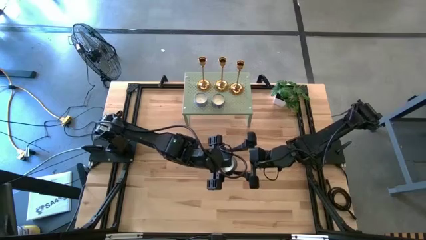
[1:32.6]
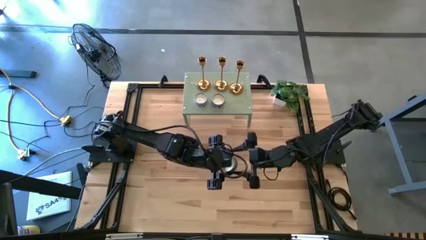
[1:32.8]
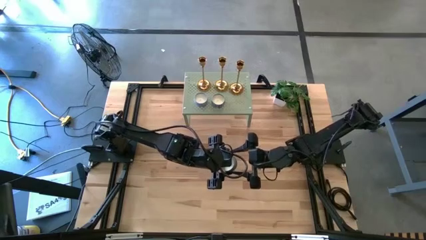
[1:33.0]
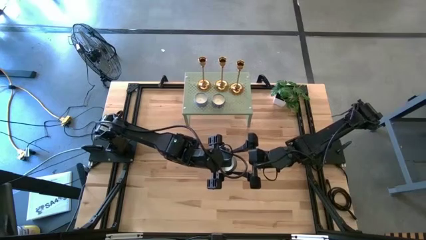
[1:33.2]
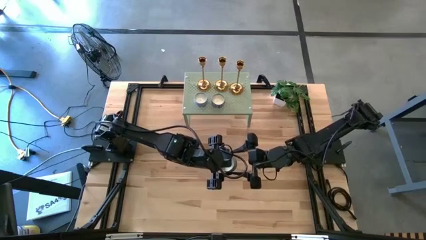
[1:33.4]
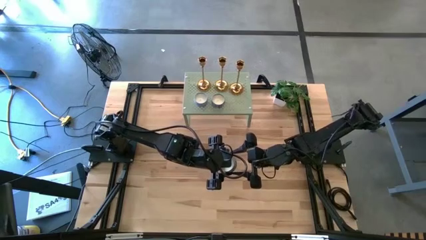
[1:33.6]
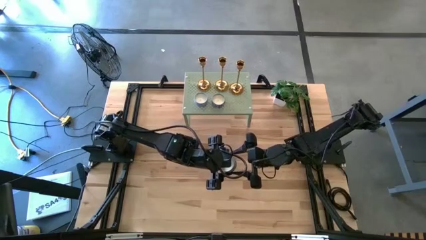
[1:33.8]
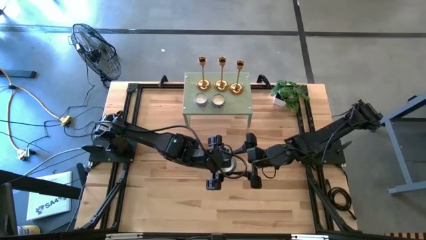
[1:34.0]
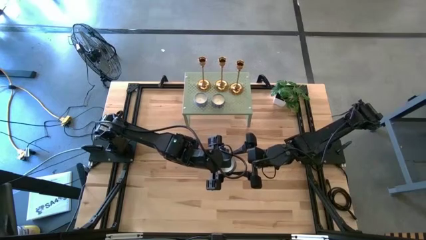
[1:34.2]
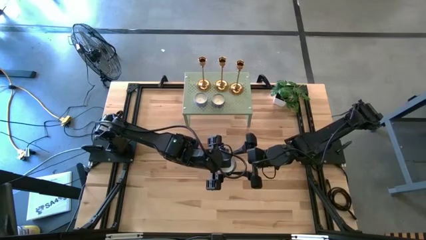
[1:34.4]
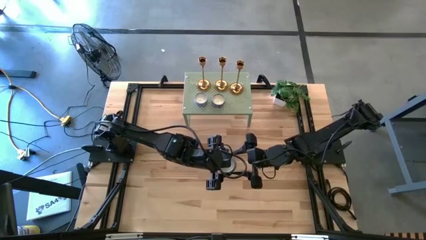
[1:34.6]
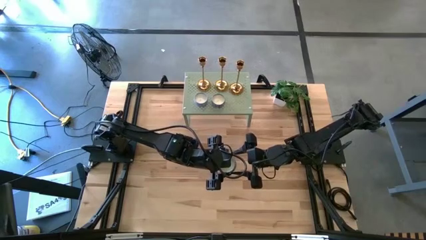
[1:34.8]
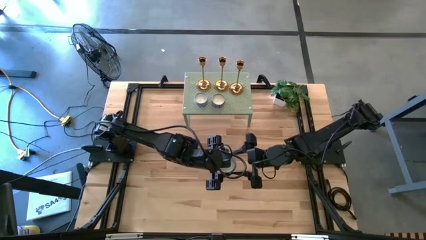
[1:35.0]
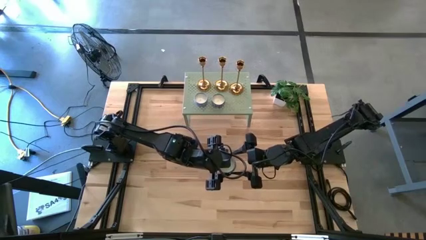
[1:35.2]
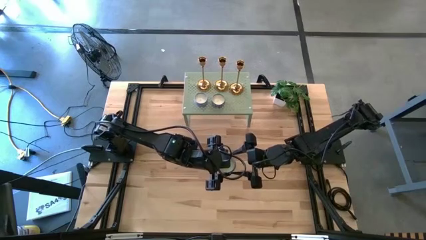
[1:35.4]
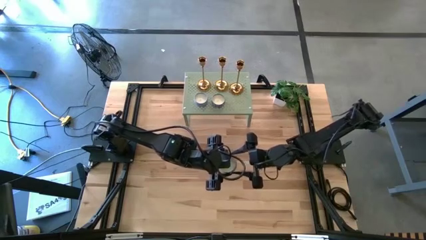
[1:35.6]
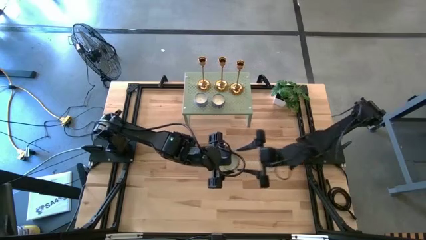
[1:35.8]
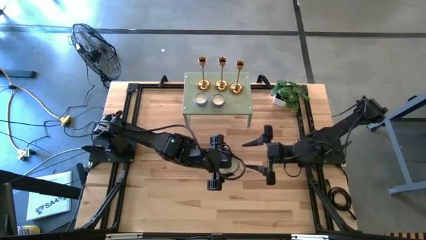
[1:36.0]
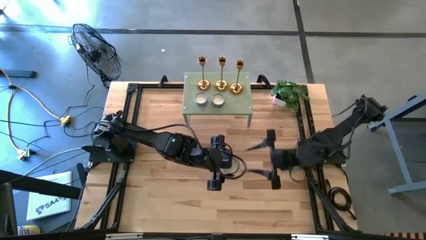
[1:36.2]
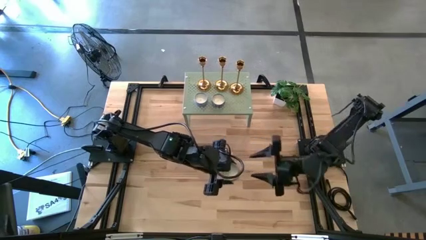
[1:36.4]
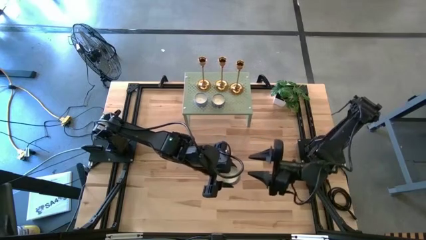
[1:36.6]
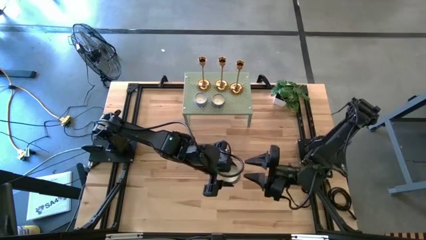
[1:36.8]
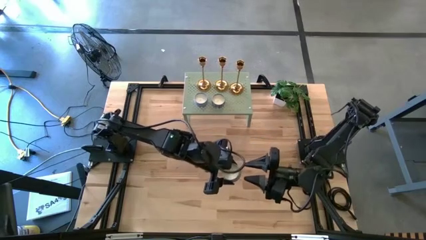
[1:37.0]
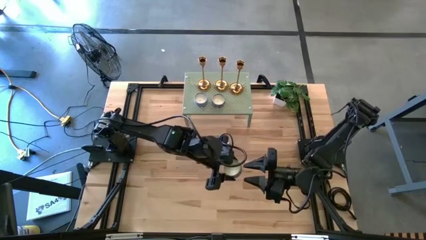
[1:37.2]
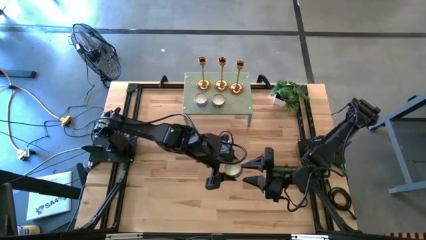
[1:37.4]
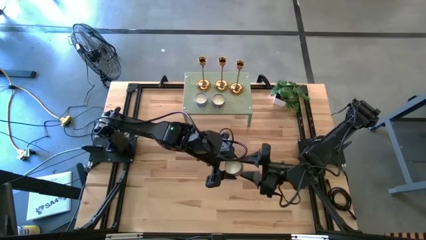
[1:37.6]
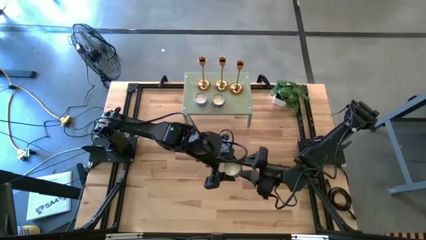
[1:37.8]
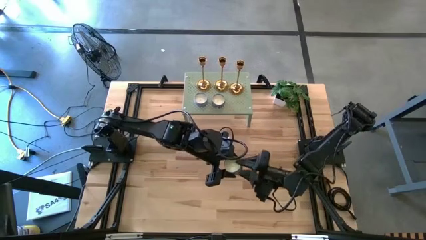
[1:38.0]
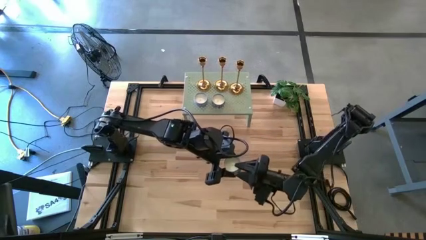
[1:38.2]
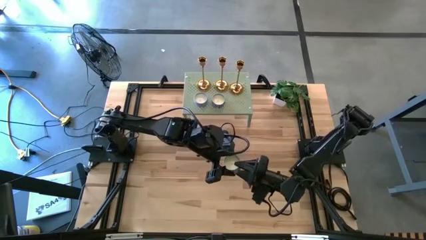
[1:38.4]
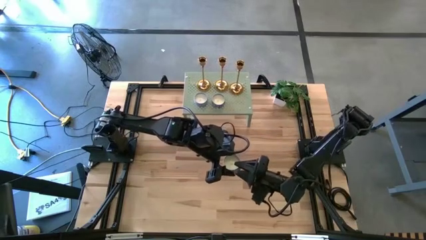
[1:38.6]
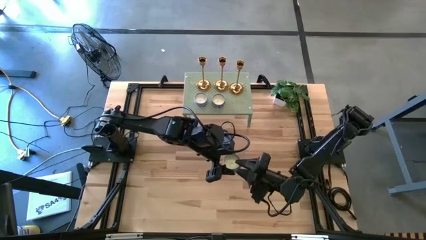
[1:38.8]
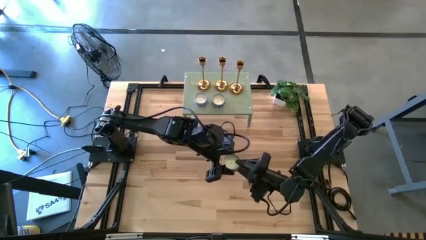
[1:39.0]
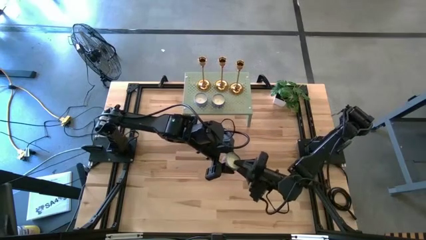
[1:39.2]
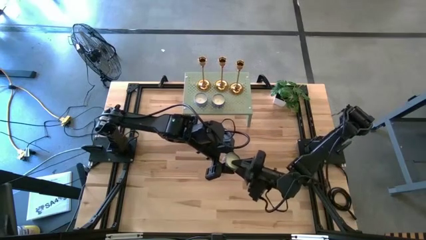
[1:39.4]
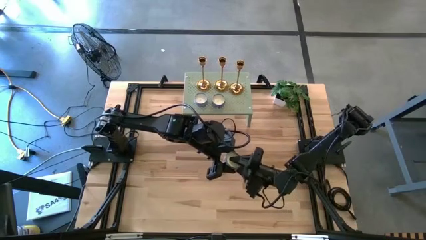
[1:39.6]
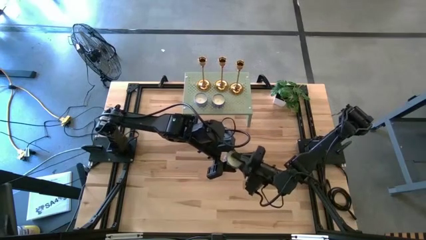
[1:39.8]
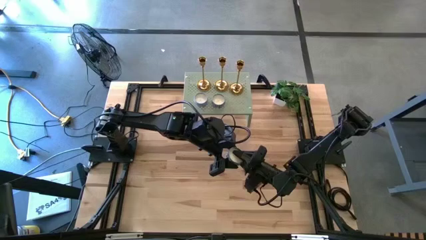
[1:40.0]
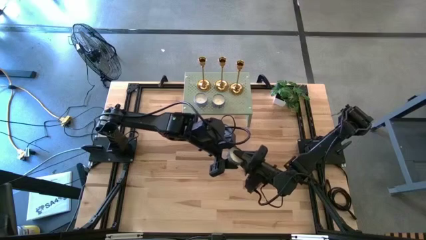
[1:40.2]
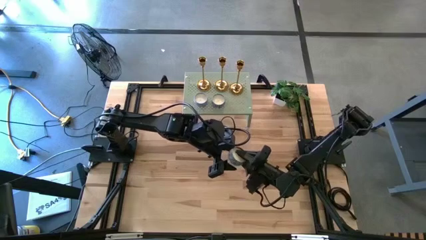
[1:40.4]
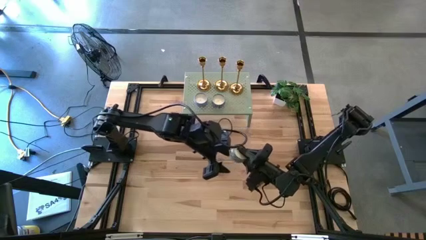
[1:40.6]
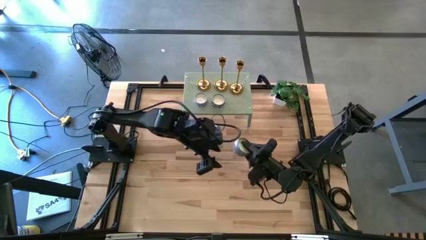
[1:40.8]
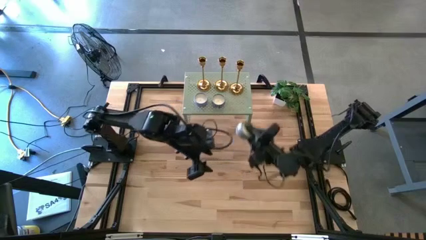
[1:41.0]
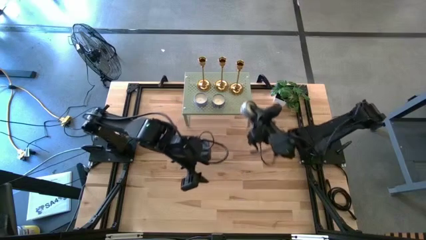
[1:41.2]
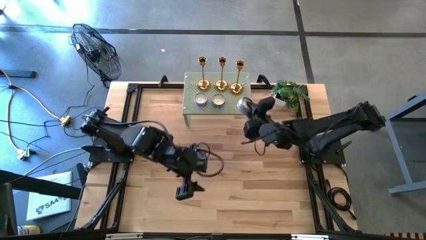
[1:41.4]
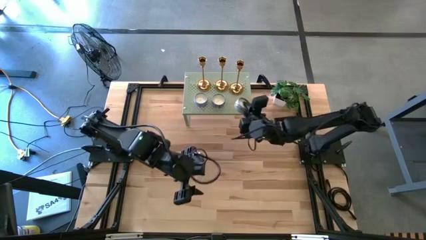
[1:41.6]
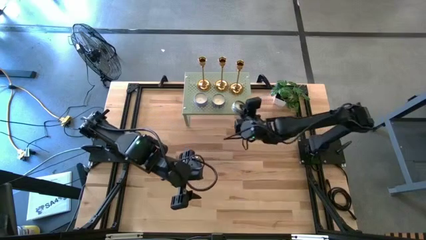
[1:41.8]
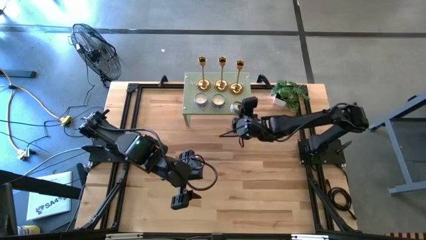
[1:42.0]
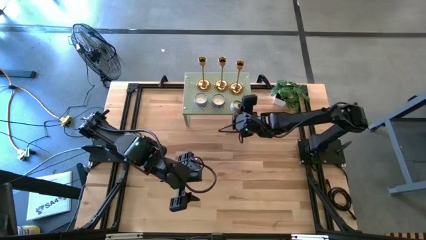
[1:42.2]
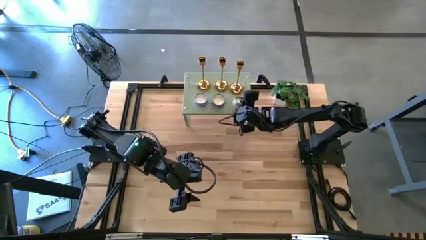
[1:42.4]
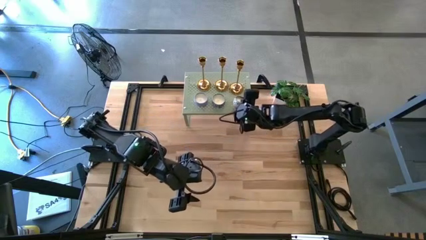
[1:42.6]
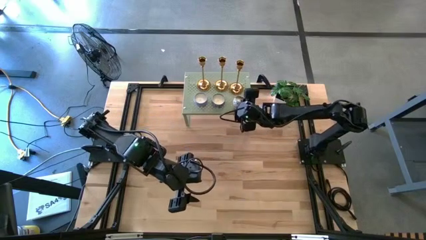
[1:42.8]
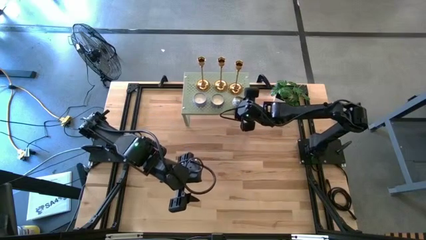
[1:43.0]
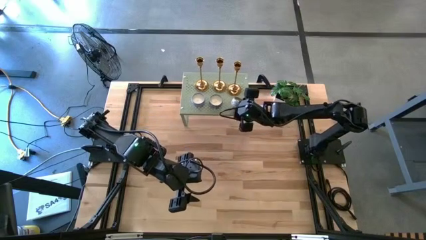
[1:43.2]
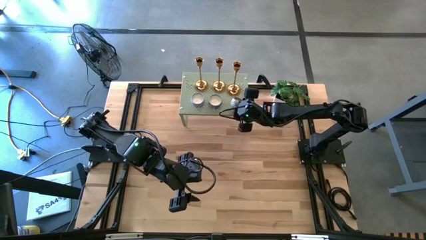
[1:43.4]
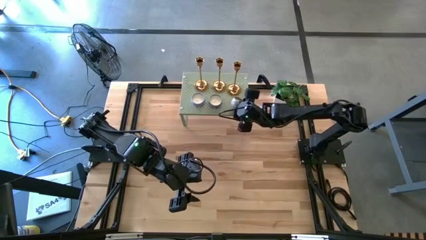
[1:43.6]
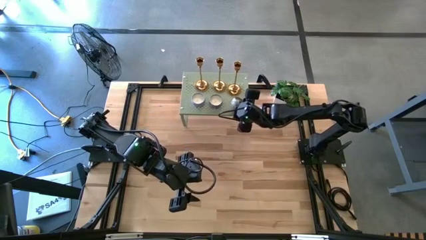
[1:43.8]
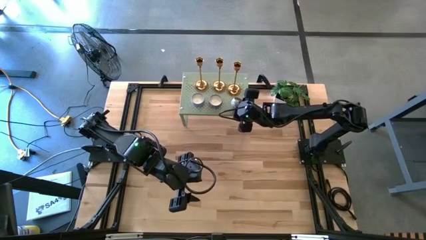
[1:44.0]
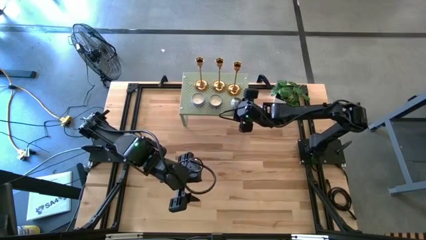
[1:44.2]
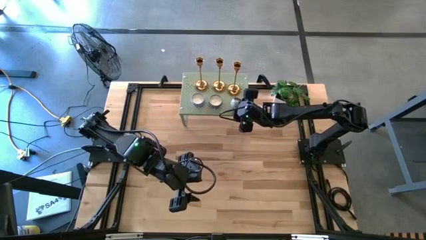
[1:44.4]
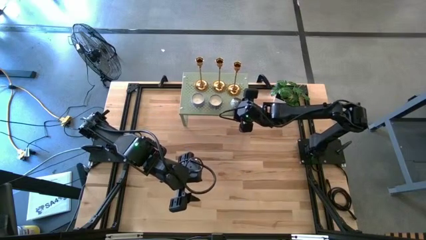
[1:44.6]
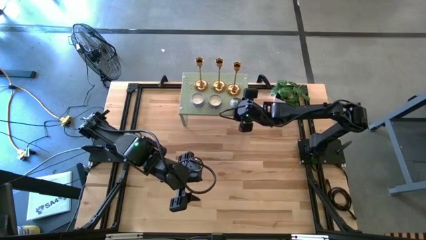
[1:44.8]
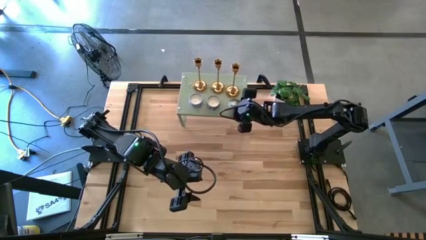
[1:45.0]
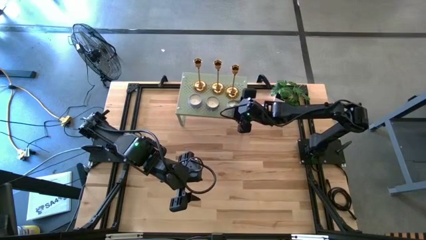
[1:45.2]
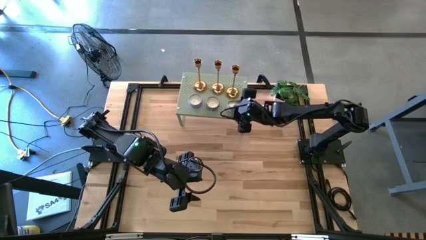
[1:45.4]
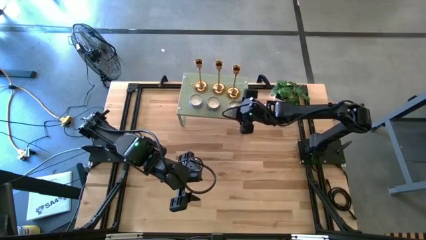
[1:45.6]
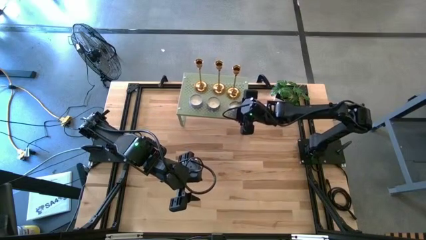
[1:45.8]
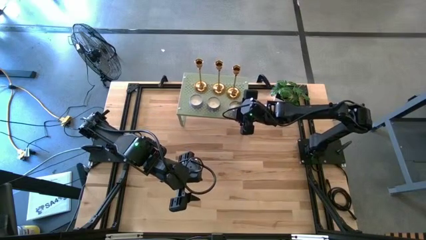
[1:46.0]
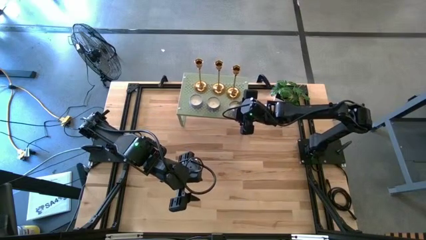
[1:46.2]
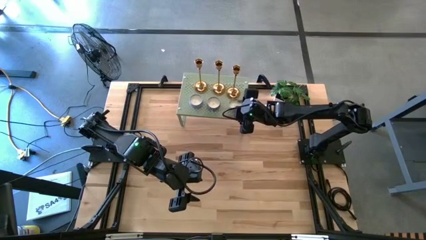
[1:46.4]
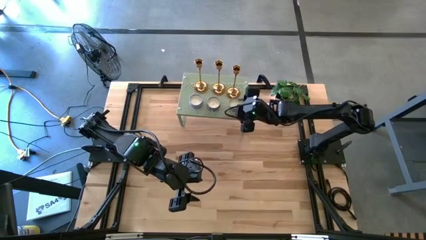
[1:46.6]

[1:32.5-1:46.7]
Task: Pick & Place candle stick holders
Put the blue scented candle on the shelf
